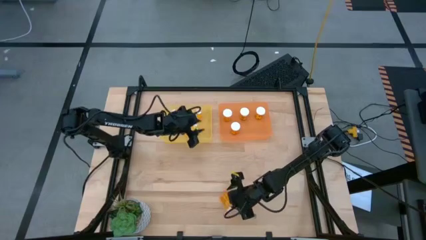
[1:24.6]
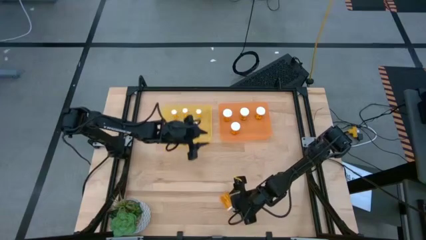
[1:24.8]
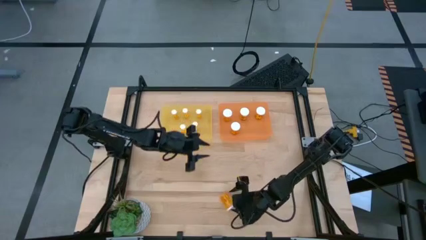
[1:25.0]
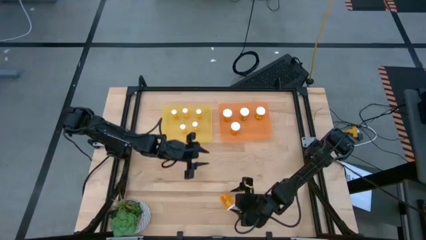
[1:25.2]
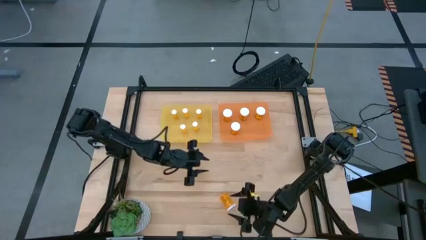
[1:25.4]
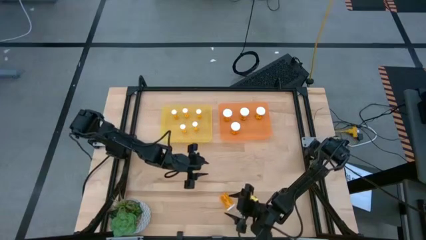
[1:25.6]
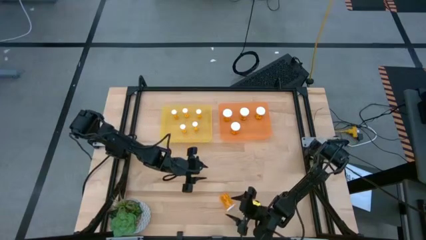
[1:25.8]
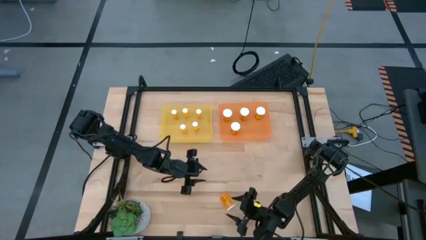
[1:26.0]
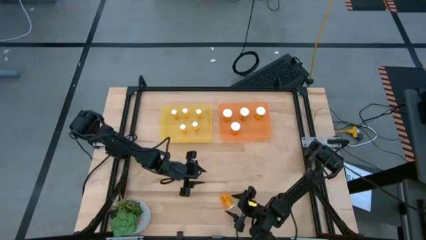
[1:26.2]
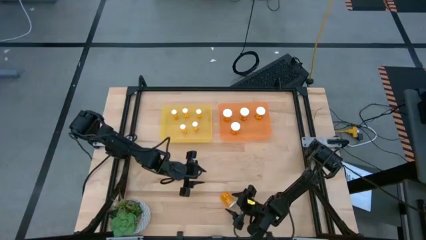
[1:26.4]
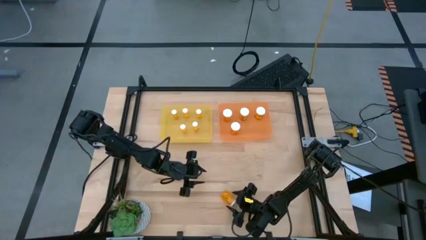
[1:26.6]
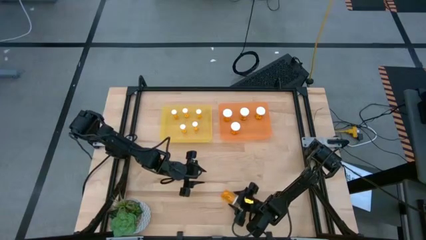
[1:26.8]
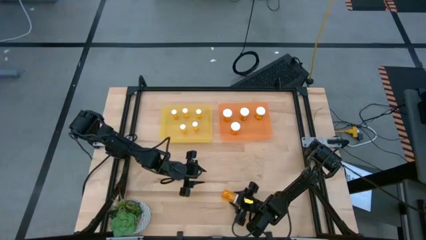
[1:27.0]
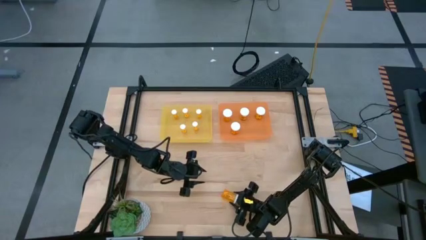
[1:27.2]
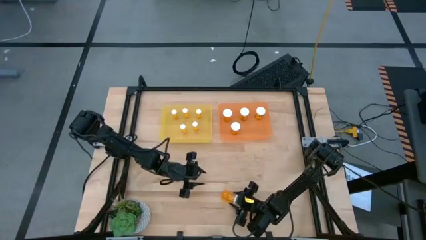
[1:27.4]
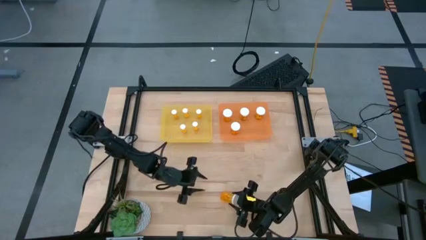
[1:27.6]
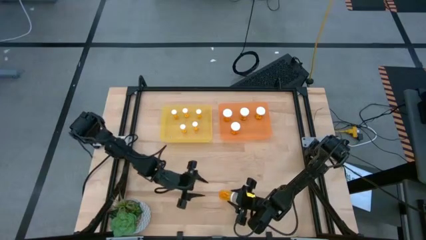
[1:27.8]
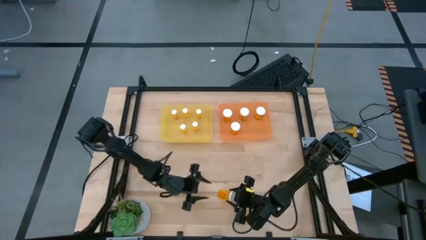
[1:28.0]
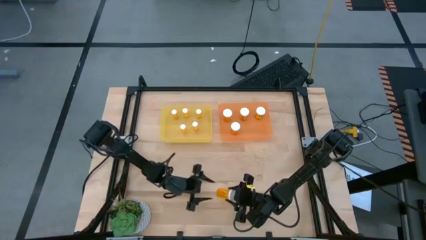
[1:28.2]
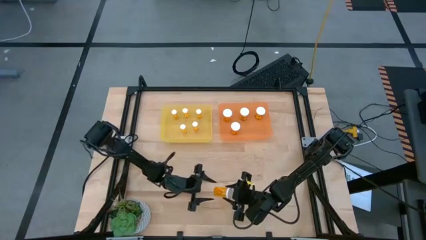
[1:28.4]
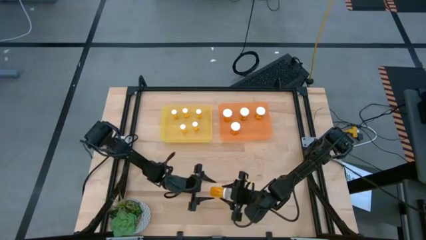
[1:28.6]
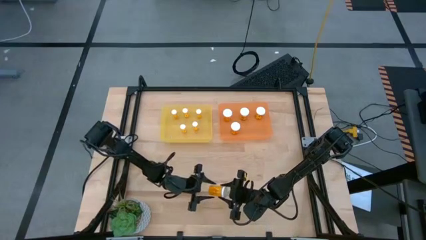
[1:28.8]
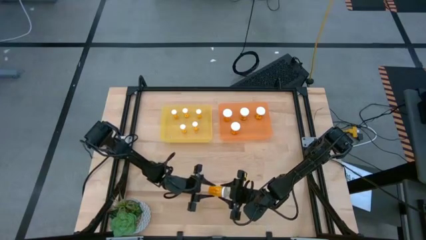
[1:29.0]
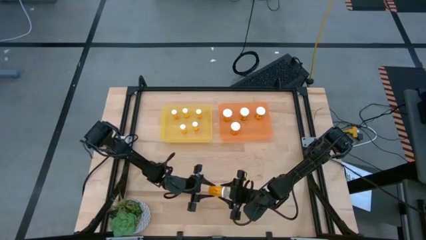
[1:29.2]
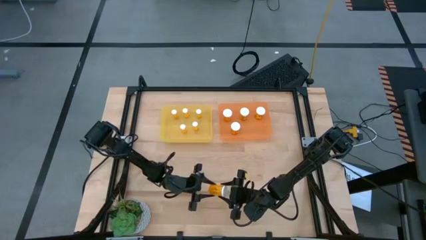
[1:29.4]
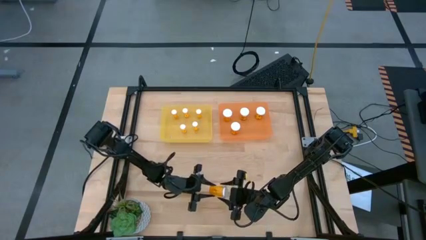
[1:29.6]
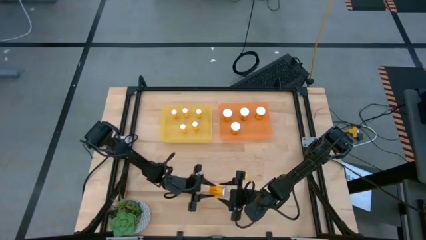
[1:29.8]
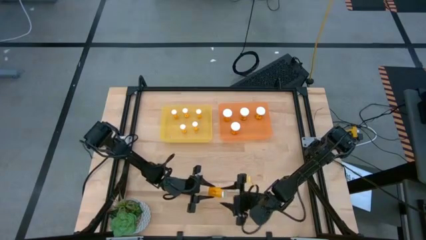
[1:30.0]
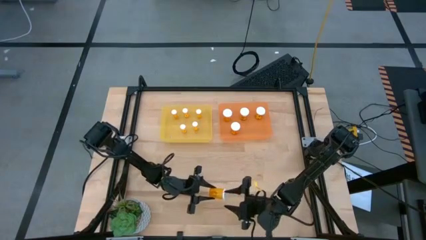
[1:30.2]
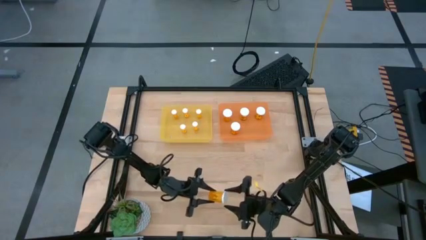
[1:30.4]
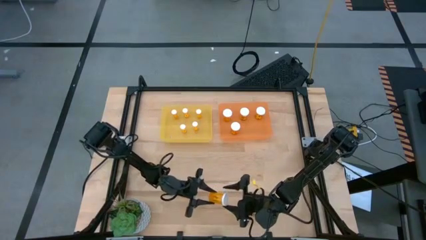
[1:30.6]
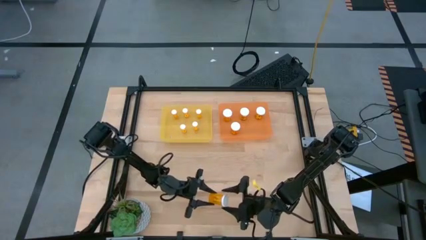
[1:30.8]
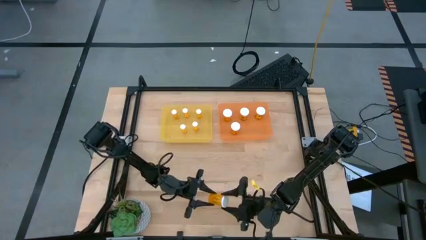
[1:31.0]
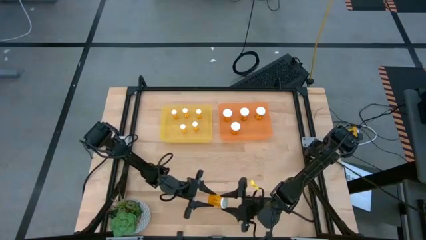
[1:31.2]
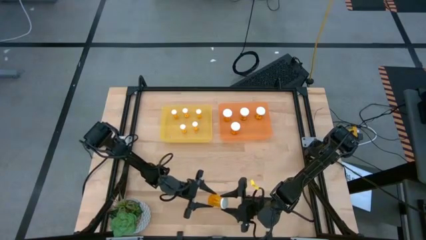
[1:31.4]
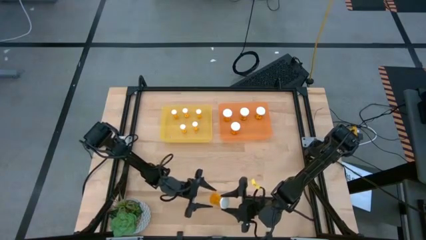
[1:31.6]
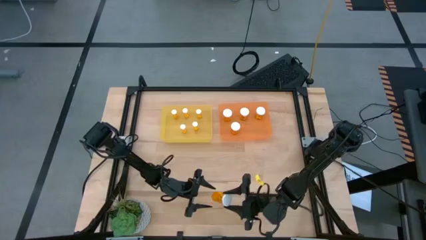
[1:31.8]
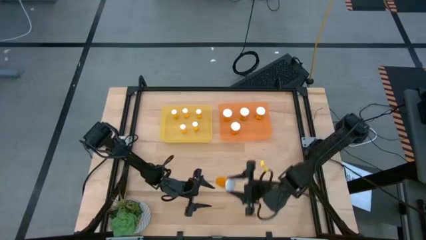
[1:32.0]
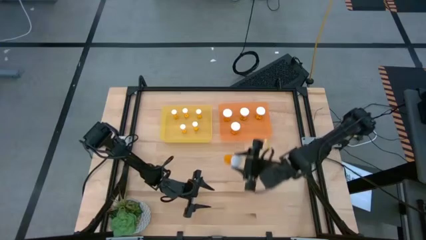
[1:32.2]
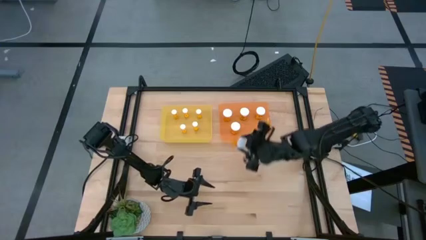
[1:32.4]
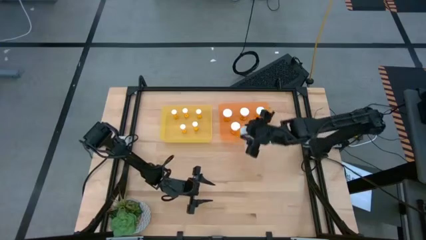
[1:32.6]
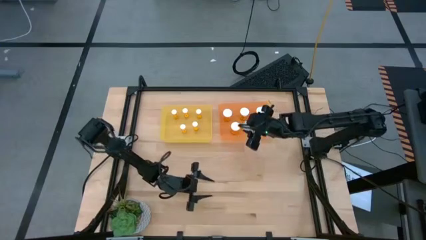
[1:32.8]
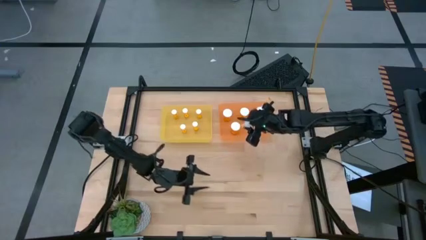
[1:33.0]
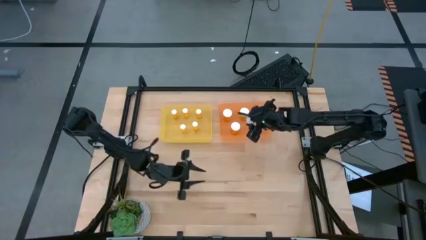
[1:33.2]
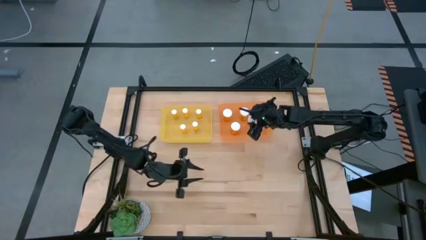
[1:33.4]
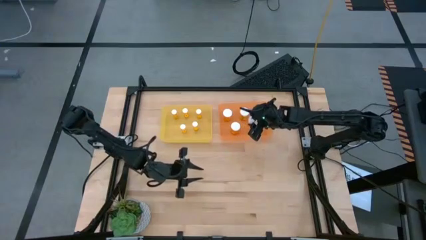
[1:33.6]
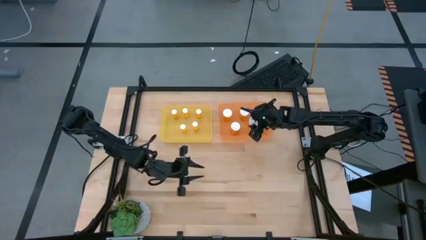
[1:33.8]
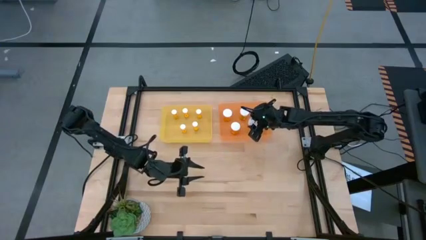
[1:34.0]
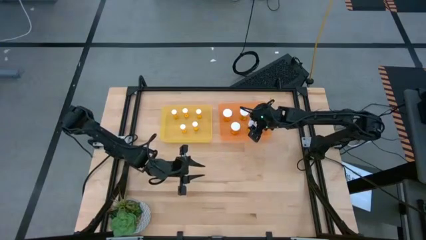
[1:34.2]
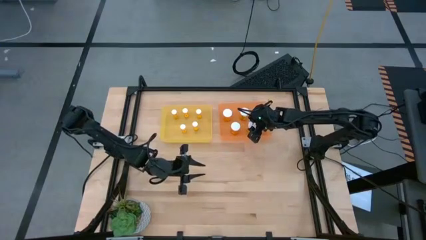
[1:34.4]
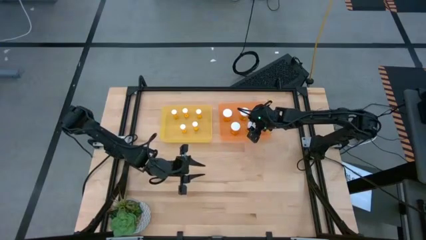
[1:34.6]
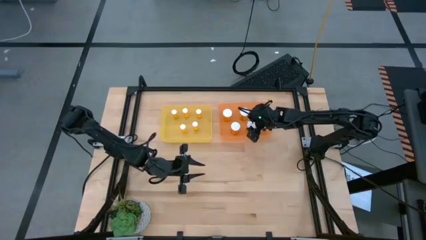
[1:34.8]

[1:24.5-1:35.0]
Task: Pick and place medicine bottles into bin by pill shape (circle, oval)
Put the big orange pill bottle into the orange bin

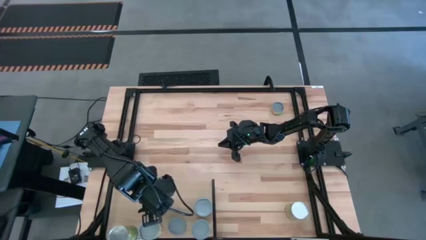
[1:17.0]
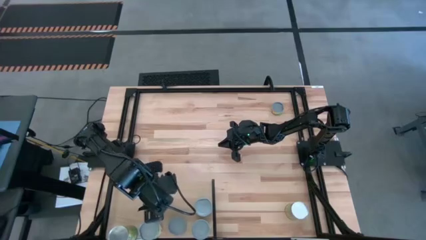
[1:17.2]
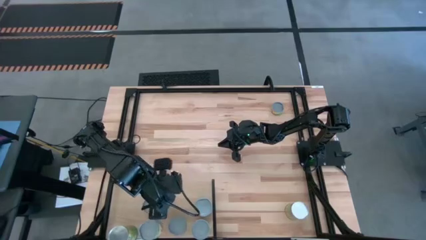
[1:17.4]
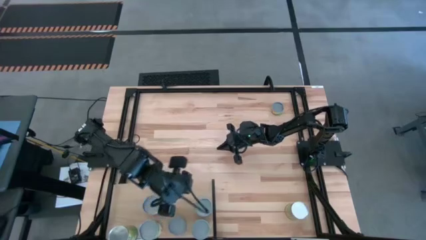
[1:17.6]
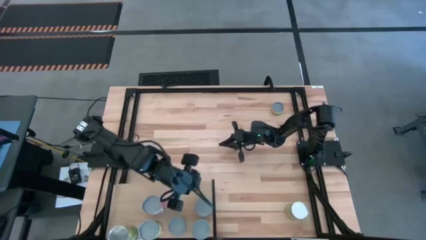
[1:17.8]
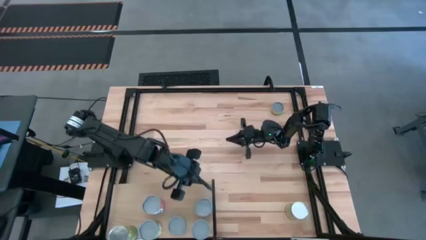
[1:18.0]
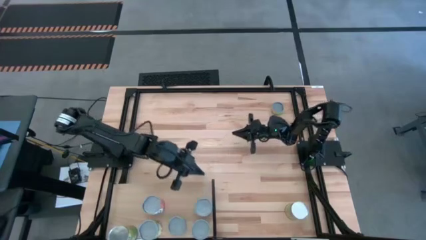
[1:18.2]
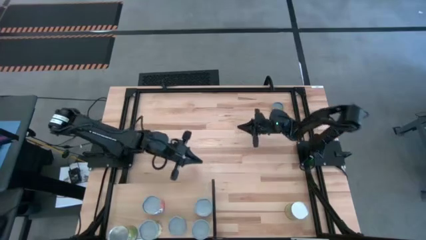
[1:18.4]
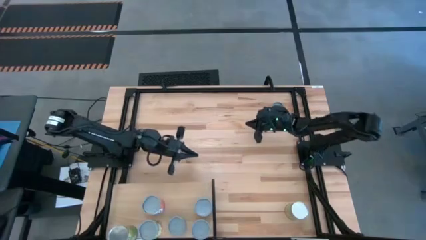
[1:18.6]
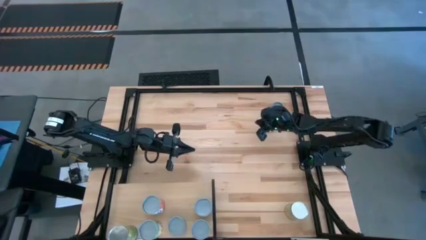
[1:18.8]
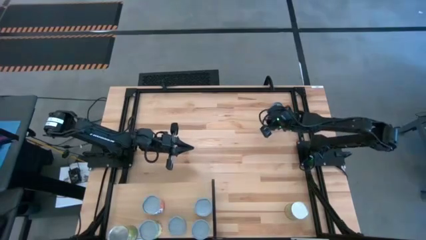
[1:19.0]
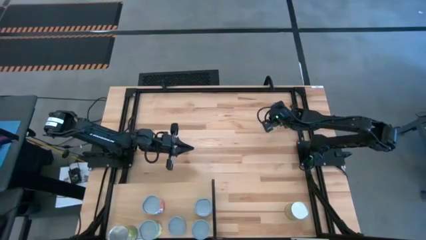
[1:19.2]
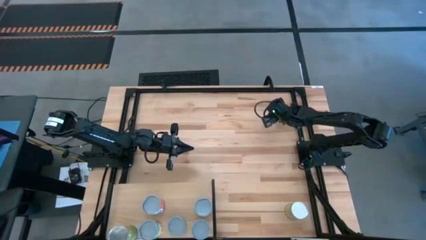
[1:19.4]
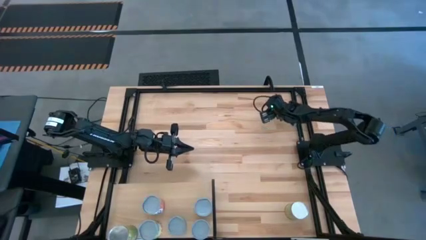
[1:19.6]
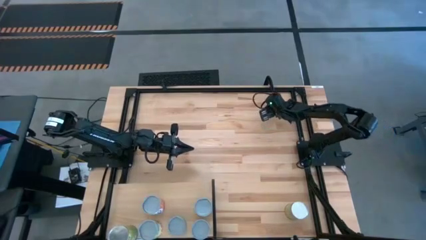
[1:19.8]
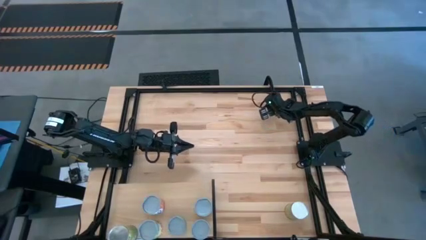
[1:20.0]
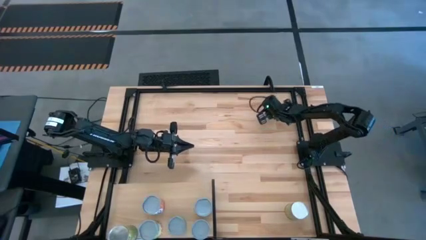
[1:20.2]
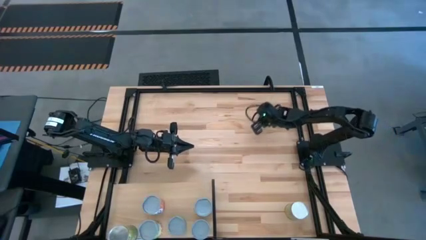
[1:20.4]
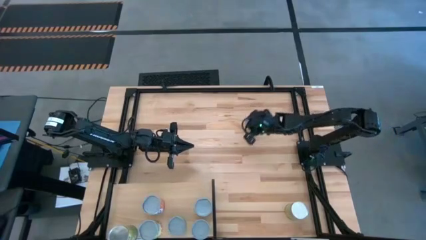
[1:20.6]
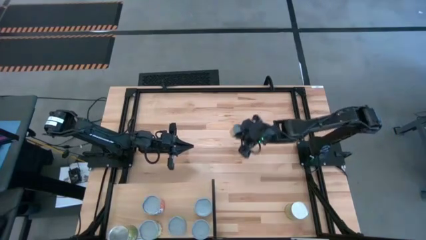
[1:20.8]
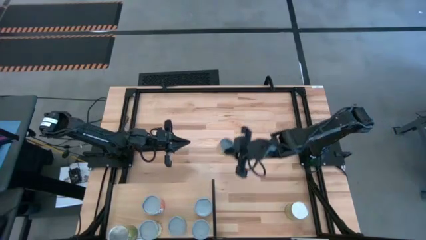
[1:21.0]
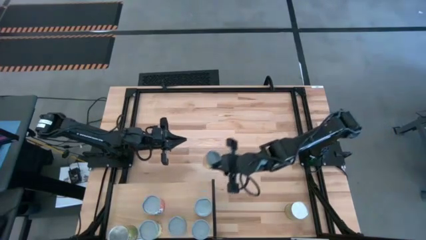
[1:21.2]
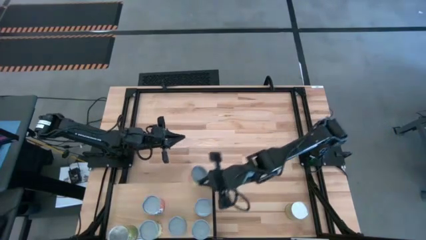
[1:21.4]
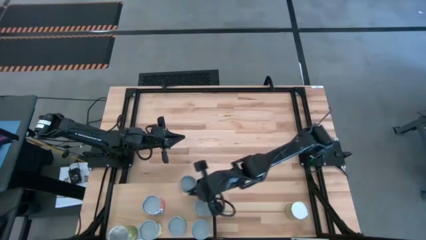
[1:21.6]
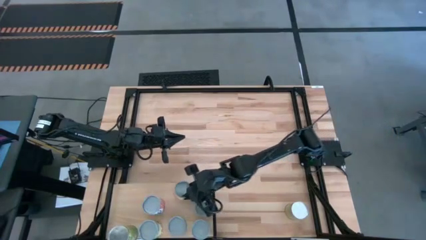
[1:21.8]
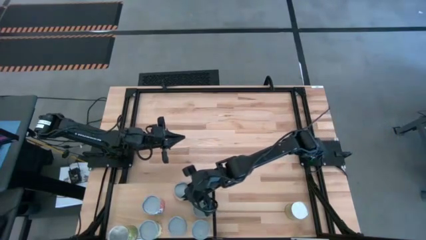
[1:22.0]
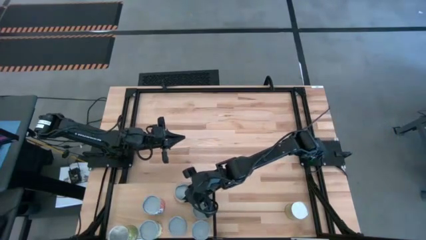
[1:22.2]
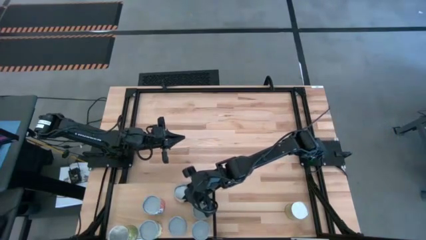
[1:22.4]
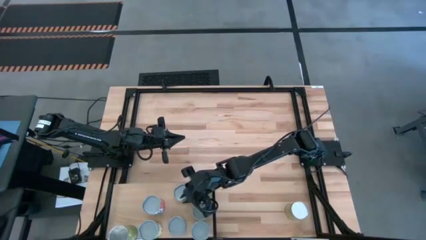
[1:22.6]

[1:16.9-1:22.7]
Task: Pick and place cans onto a shelf
Put the canned mushrooms on the shelf

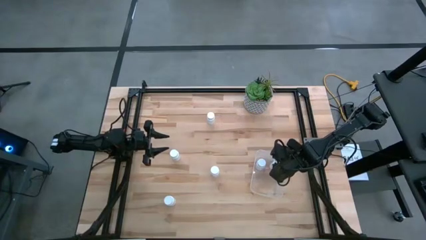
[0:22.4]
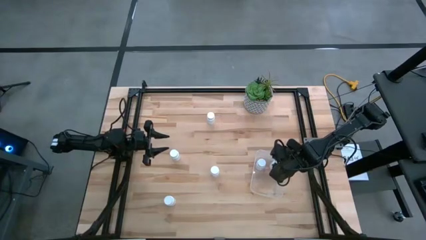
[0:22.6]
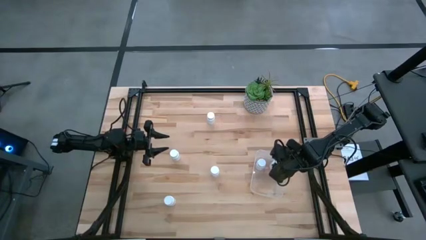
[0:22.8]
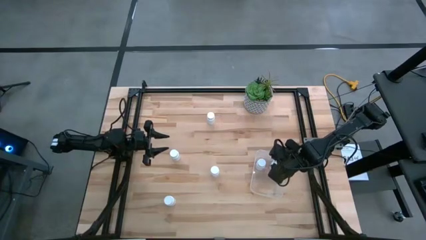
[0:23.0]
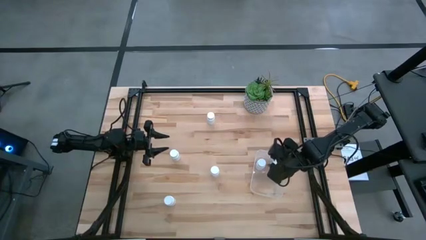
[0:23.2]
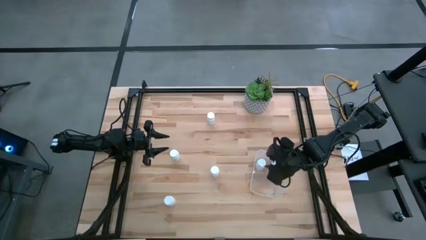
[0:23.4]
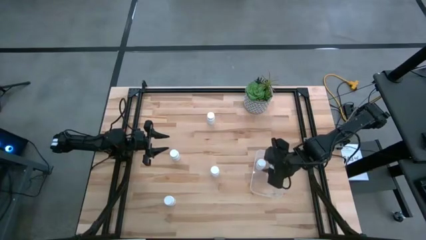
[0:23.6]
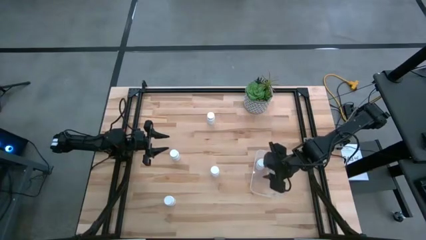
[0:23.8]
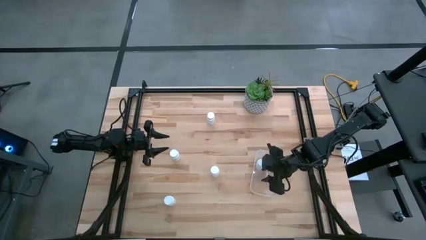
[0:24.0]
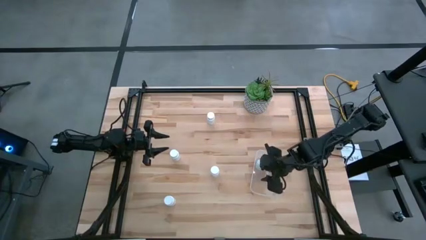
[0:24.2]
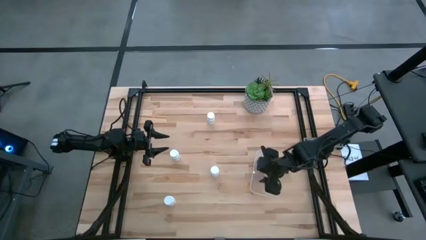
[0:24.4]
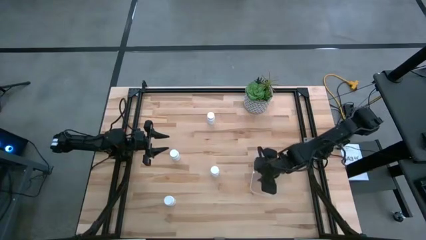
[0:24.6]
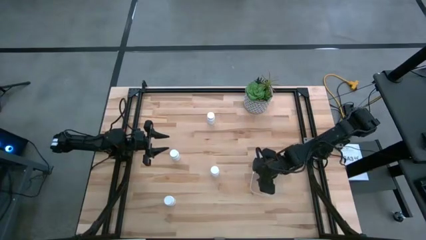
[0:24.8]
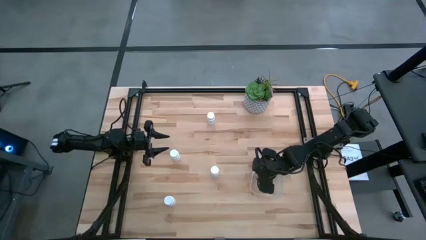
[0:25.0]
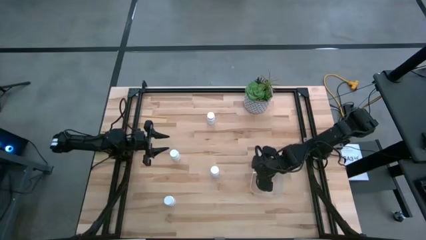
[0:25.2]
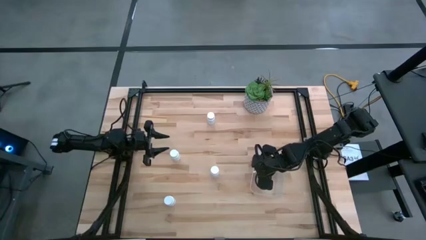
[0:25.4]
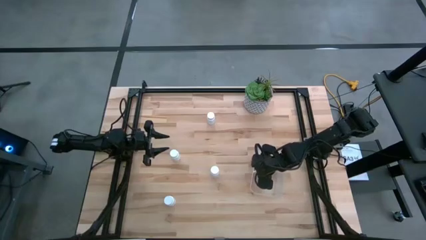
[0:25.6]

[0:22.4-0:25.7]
Task: Pick and place pill bottles into a basket
Adjust the white medicine bottle in the transparent bin
